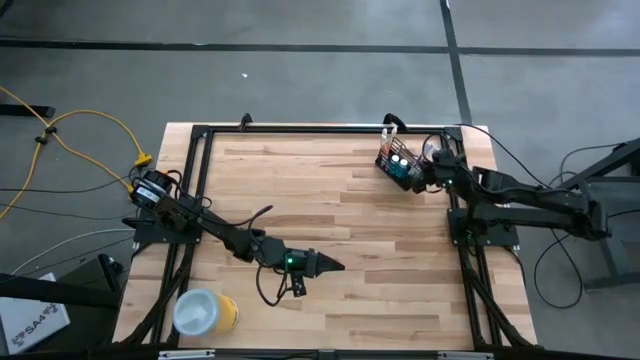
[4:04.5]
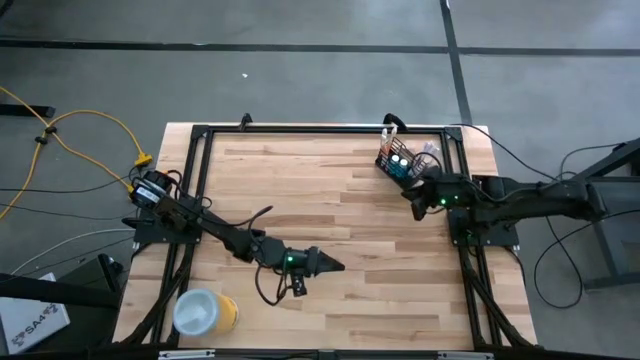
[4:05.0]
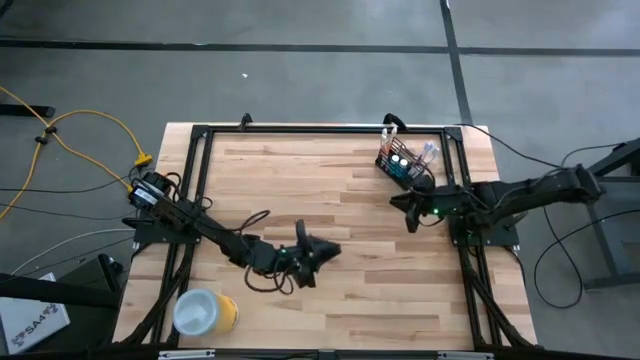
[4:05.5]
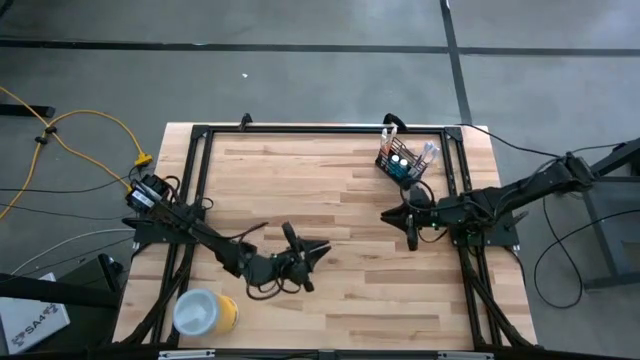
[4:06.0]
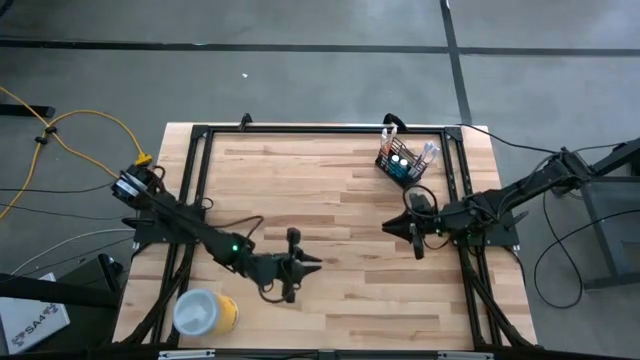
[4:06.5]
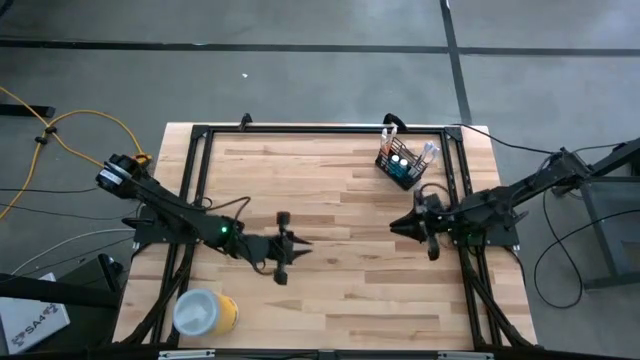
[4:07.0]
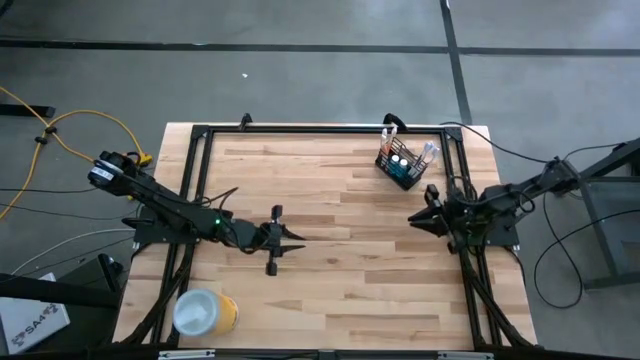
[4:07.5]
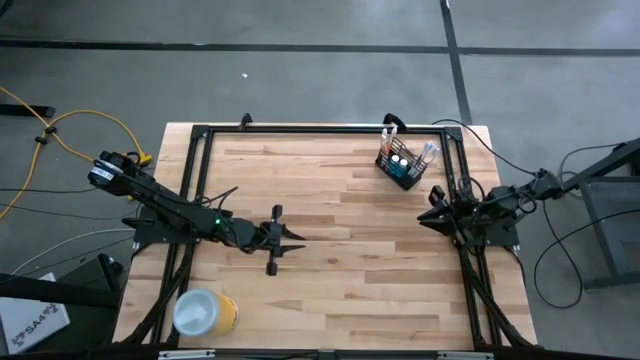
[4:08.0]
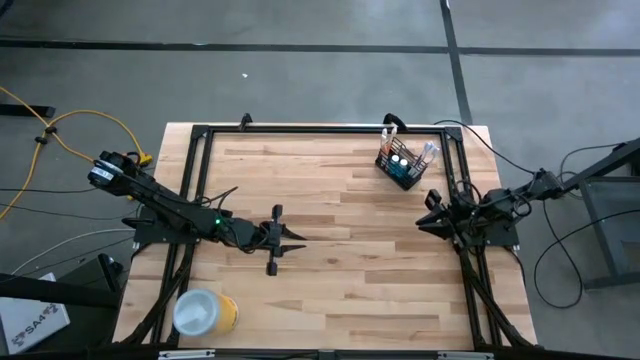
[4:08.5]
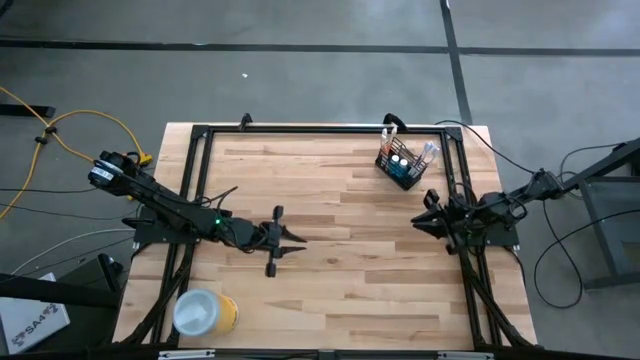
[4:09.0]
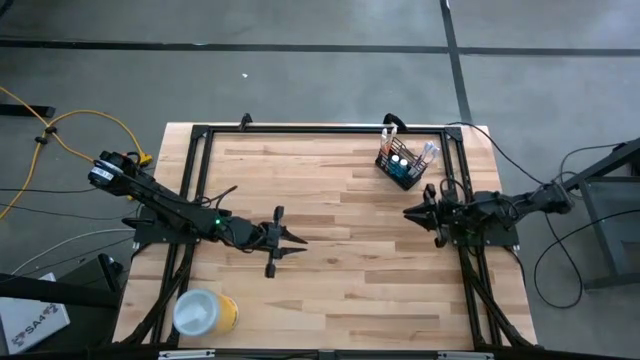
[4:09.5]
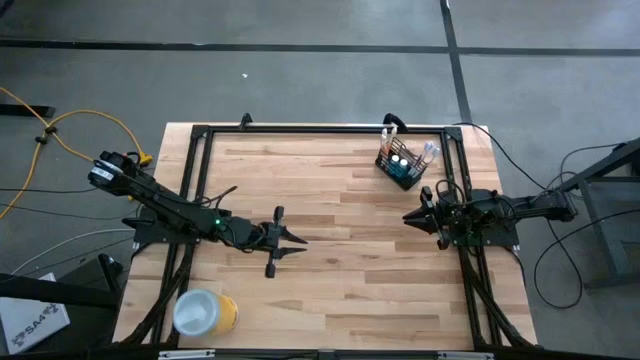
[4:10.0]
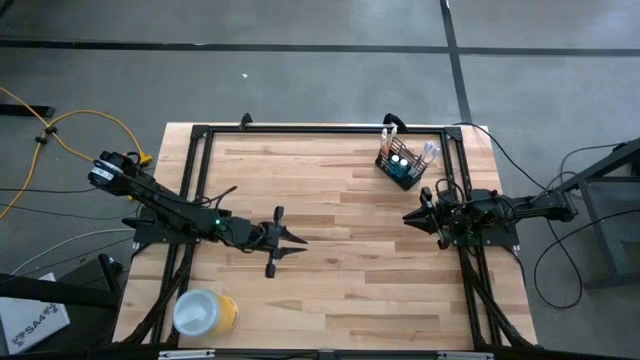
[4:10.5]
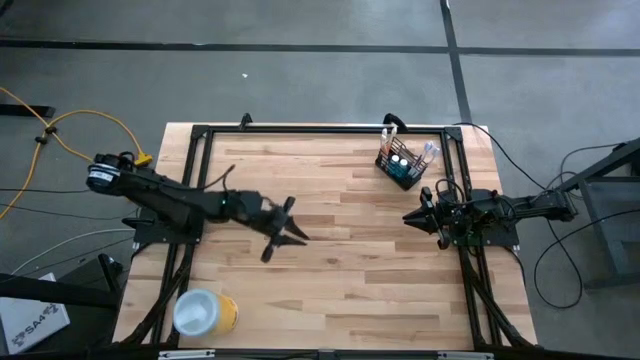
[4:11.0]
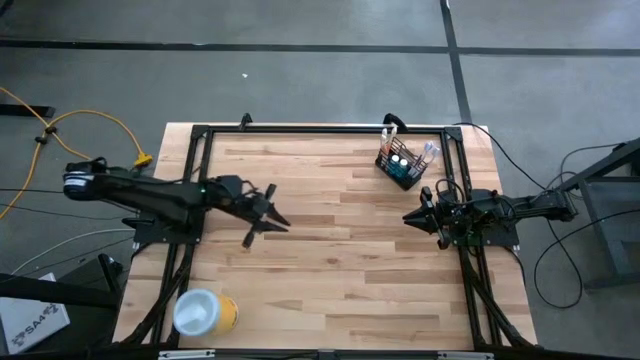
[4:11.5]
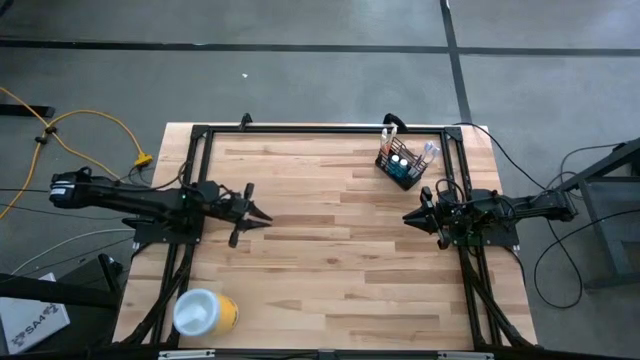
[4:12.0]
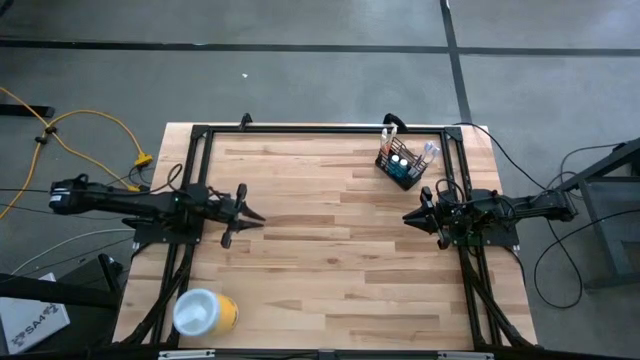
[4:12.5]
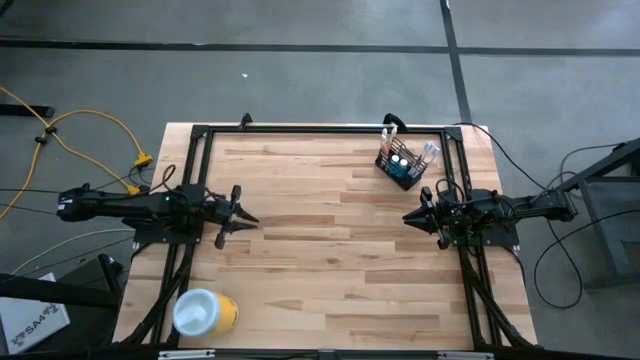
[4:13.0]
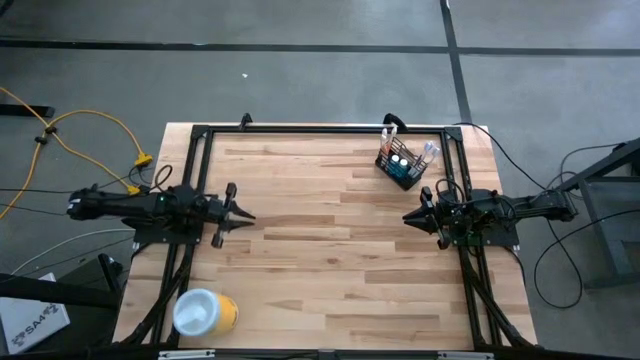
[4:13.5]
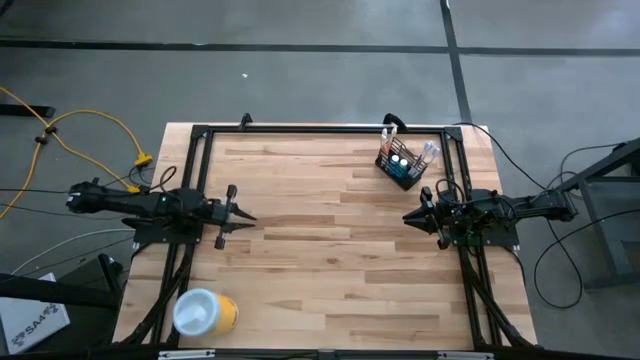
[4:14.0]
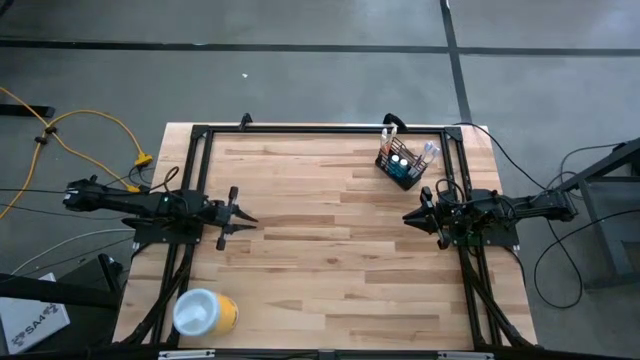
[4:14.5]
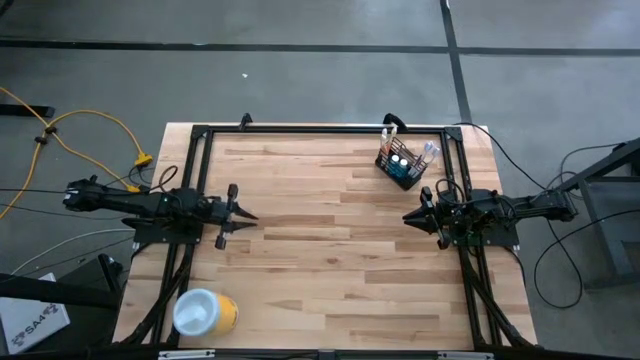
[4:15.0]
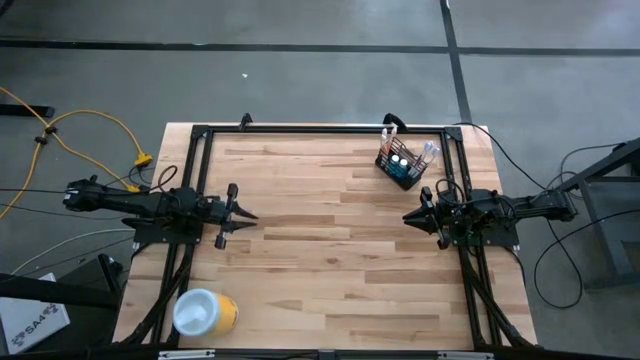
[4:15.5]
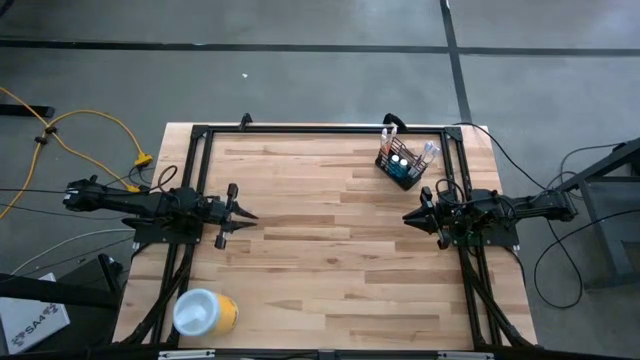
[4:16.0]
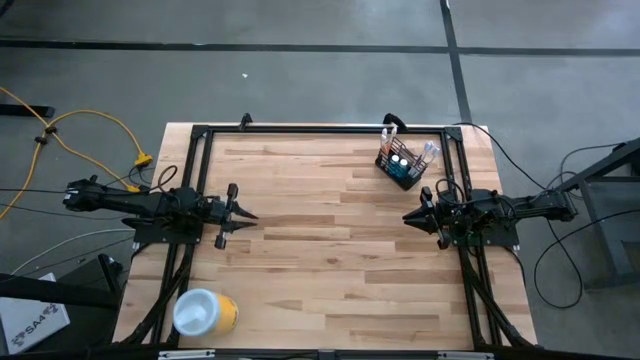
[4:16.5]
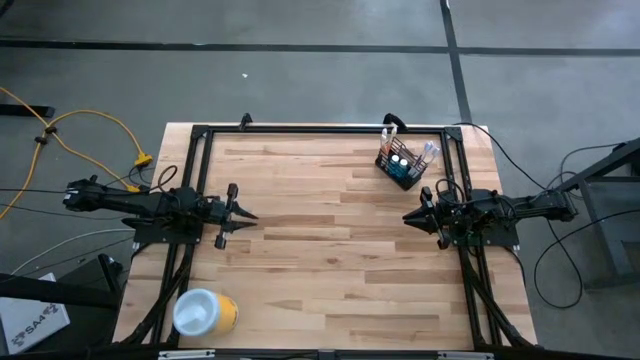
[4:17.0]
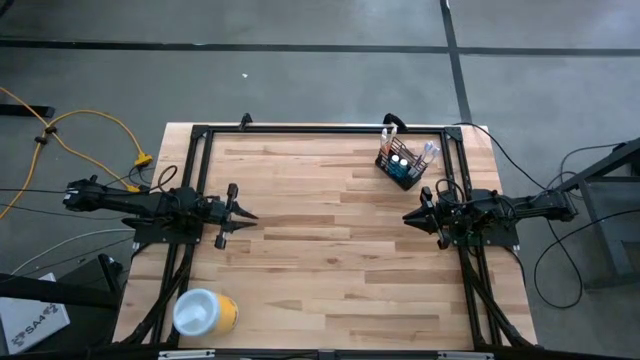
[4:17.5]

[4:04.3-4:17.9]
Task: Pick & Place toothbrushing station
Return to Home Position
